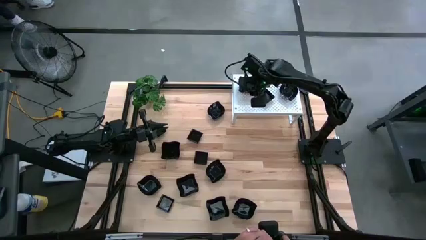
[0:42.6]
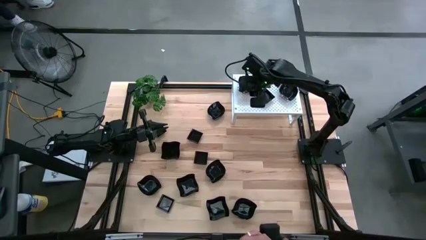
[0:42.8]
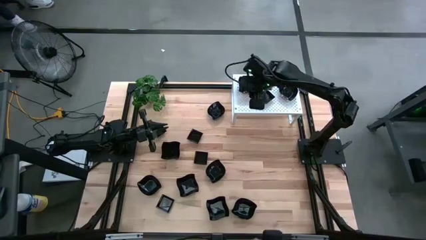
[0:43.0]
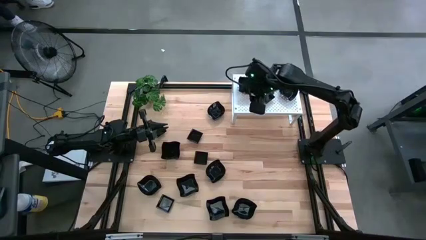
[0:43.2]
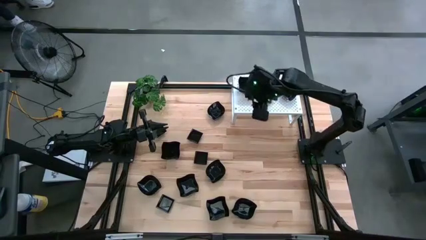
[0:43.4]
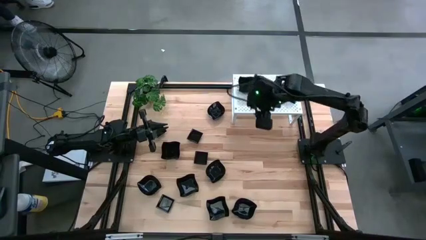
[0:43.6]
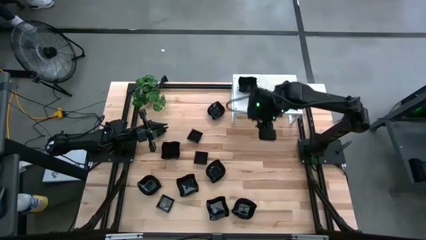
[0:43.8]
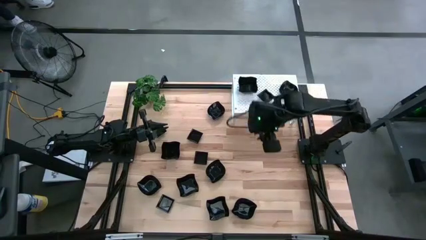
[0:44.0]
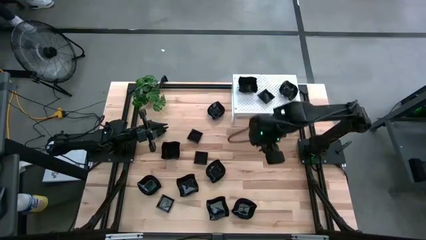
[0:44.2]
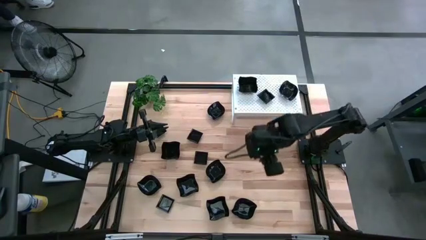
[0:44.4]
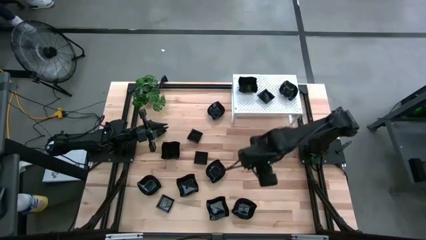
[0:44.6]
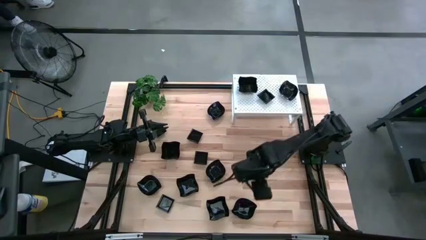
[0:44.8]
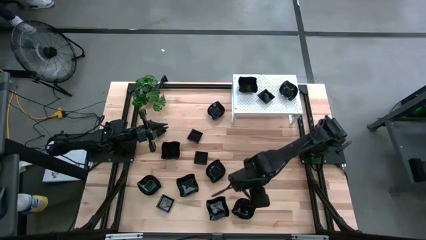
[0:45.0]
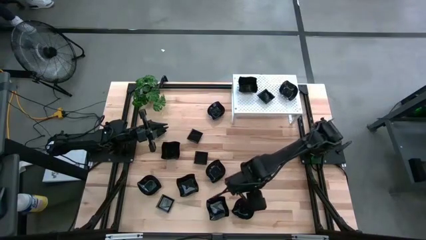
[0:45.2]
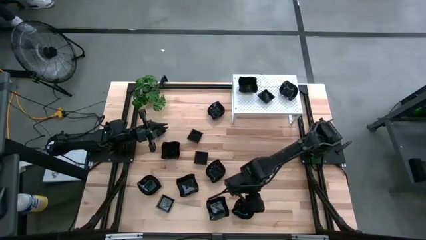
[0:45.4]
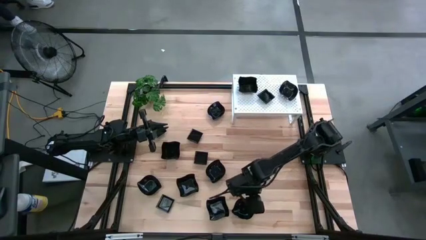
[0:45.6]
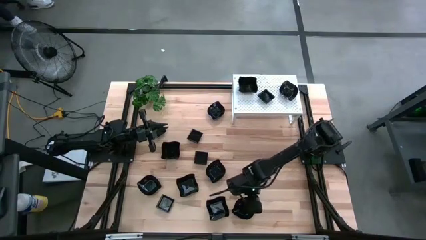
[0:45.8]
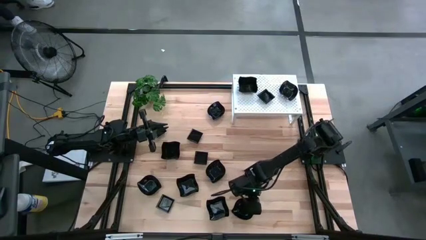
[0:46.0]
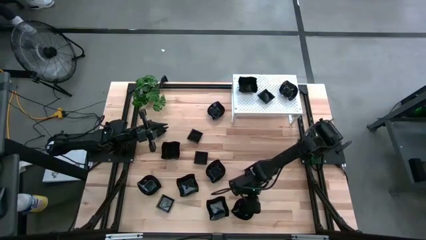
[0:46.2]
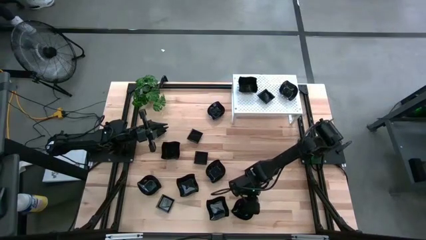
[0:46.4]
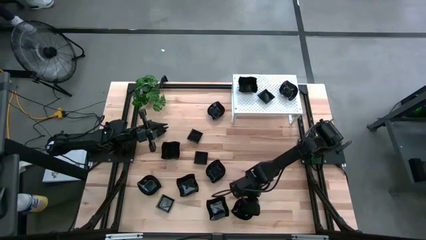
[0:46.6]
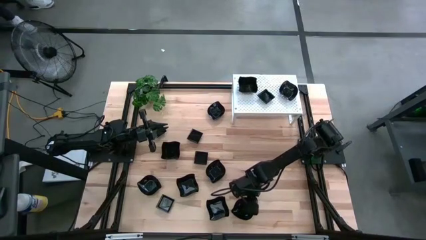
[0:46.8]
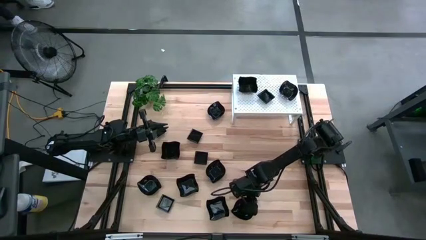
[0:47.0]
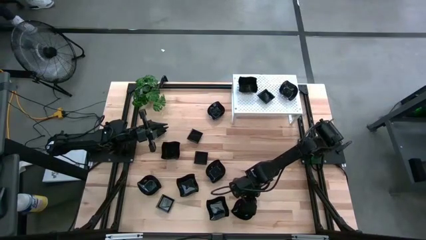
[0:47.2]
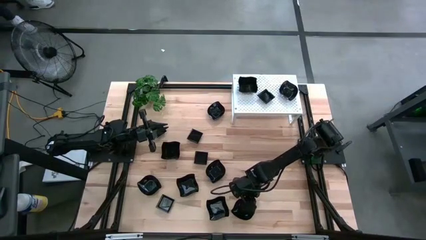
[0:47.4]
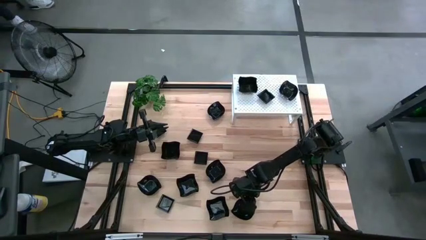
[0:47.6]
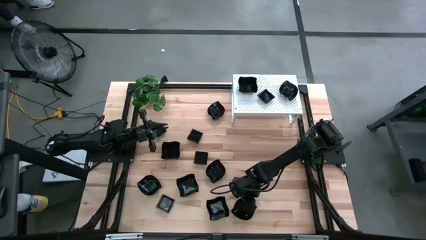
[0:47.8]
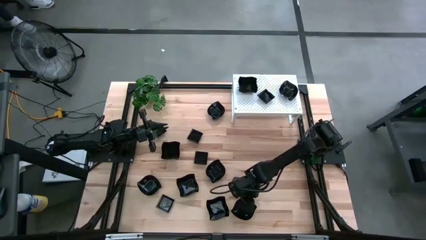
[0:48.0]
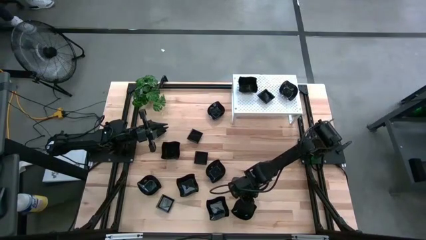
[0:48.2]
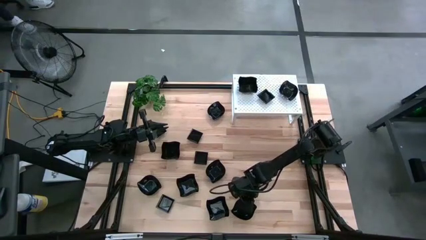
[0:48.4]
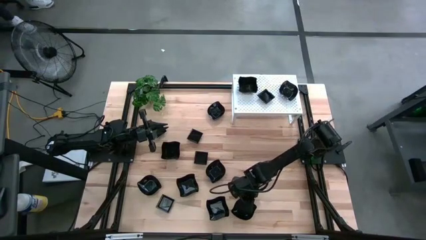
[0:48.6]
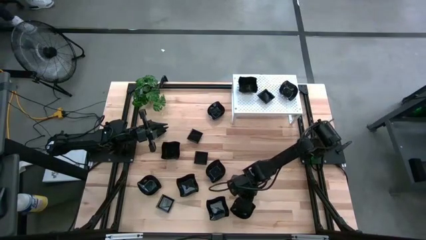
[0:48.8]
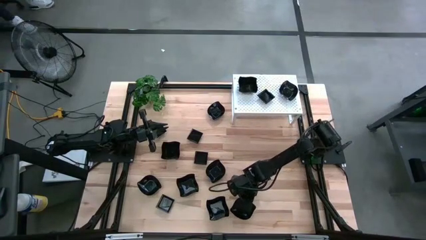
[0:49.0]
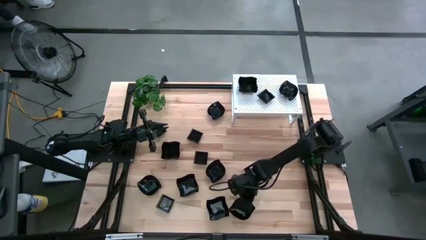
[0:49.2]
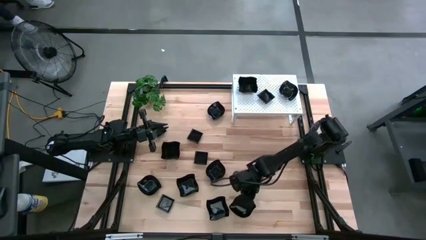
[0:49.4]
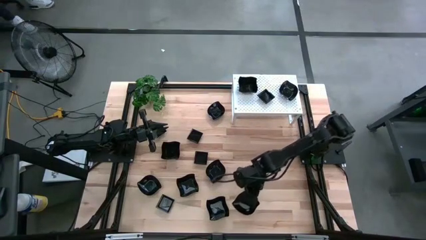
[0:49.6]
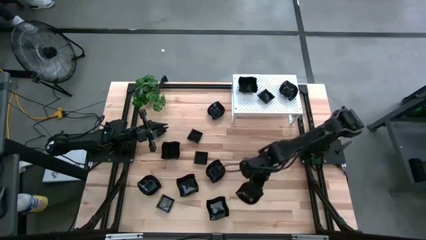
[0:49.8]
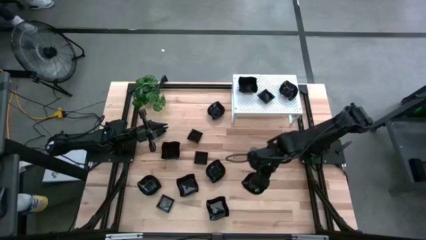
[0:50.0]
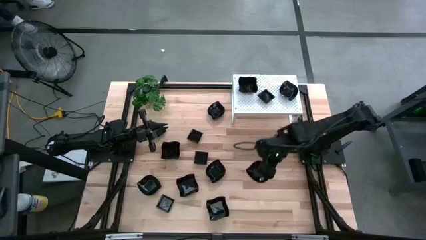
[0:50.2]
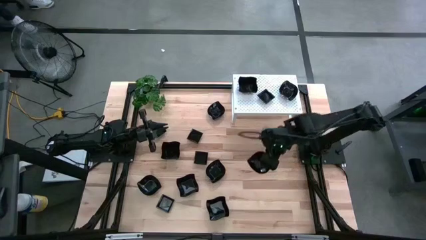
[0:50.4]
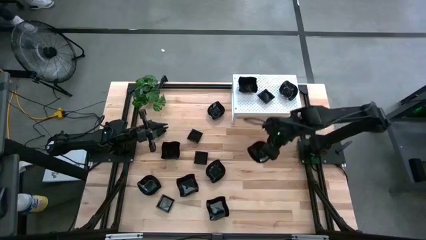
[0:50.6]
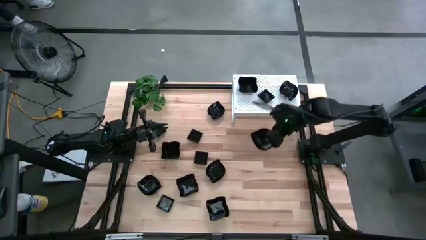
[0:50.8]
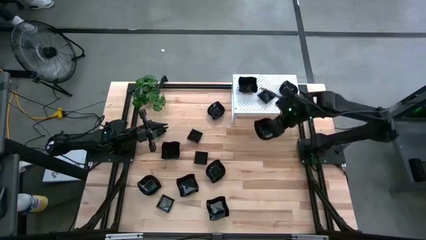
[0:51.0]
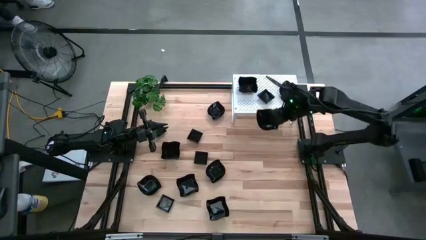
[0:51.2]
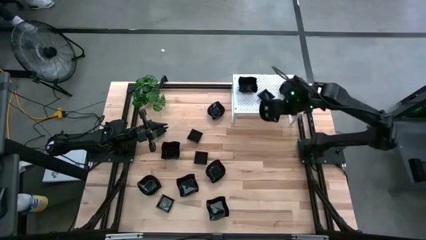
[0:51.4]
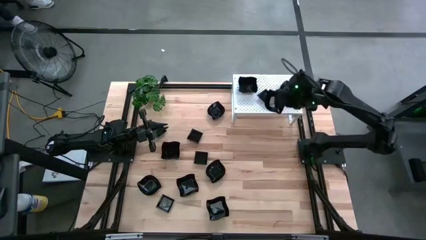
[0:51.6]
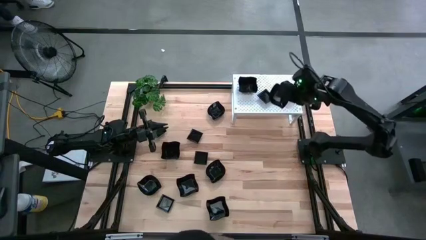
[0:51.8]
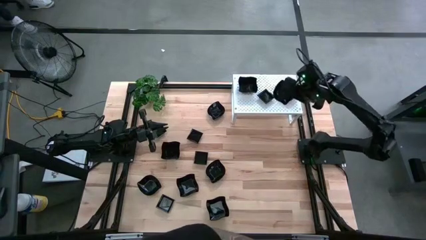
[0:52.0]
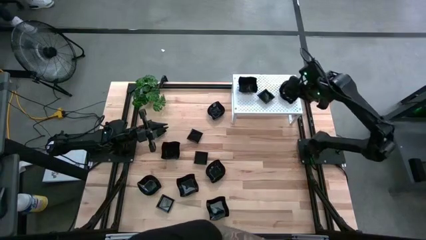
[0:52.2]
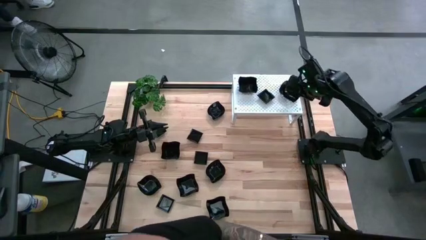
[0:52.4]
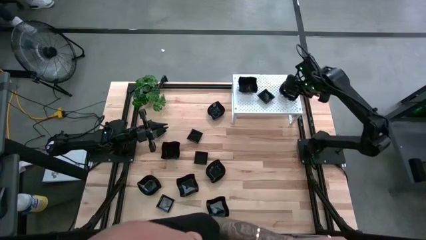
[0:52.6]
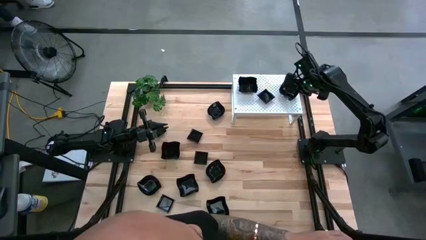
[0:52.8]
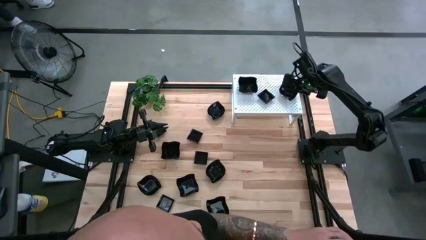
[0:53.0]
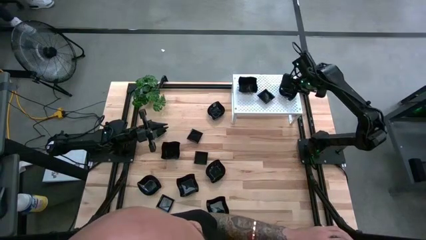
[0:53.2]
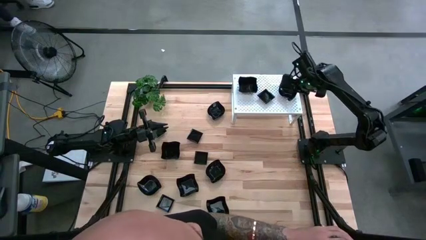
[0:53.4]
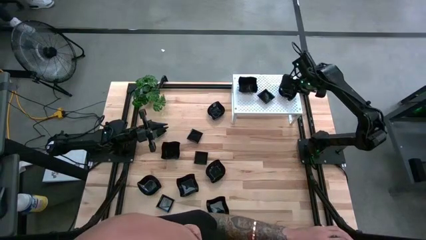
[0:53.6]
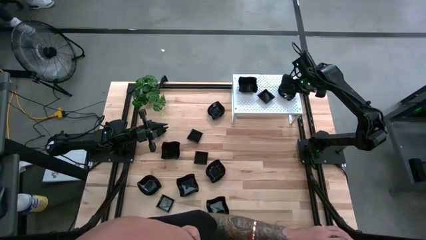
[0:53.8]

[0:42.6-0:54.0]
Task: Pick & Place Mini shaped plates
Stack the leaf-shaped plate on top of the leaf-shaped plate on the shelf

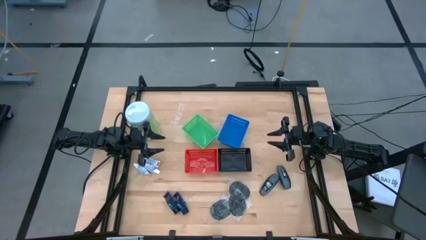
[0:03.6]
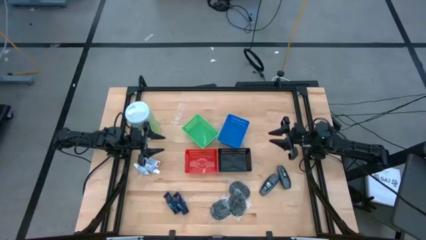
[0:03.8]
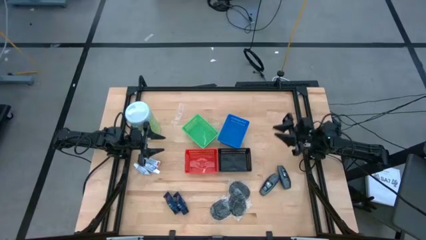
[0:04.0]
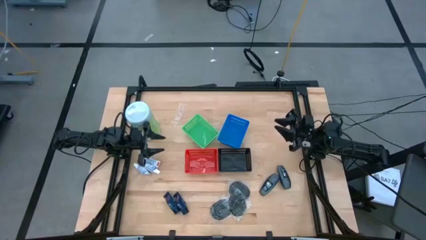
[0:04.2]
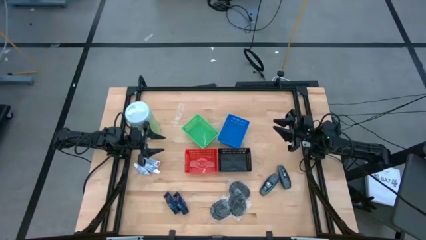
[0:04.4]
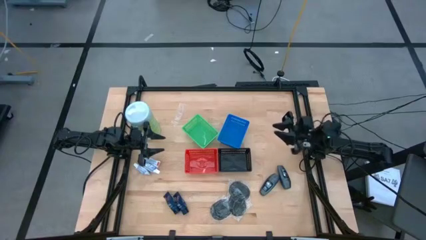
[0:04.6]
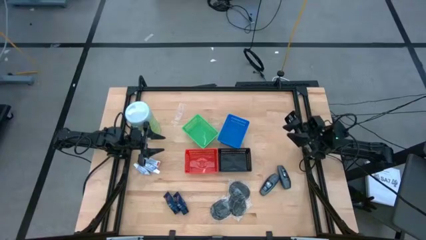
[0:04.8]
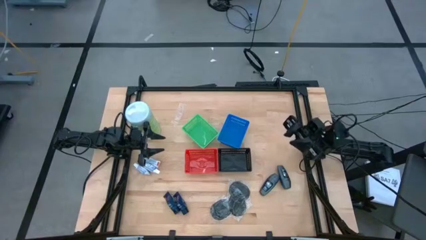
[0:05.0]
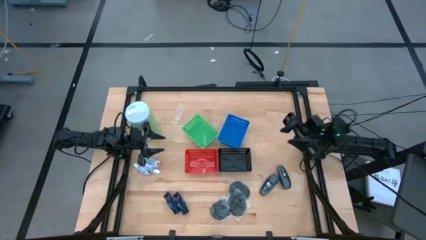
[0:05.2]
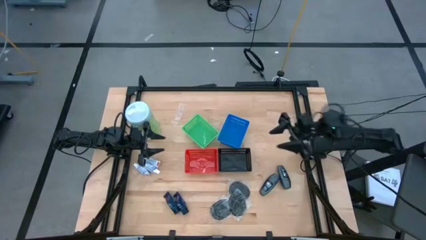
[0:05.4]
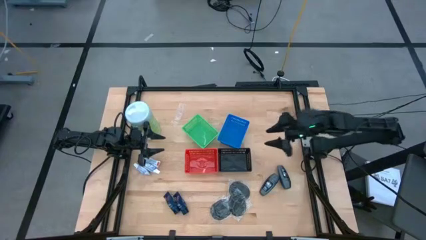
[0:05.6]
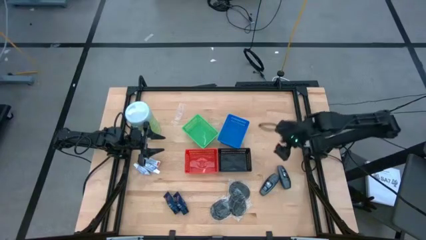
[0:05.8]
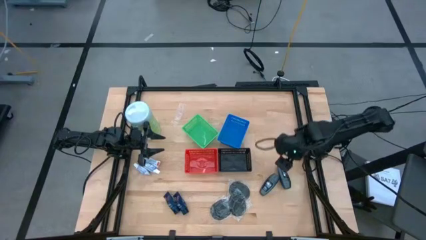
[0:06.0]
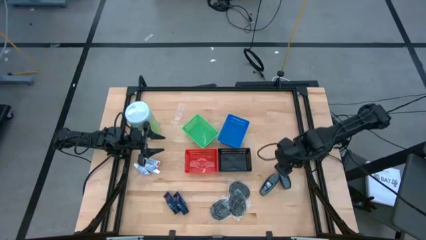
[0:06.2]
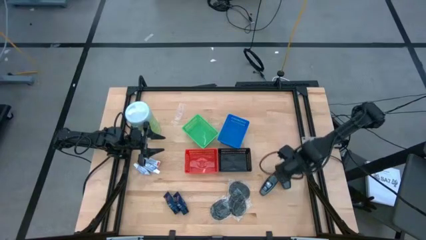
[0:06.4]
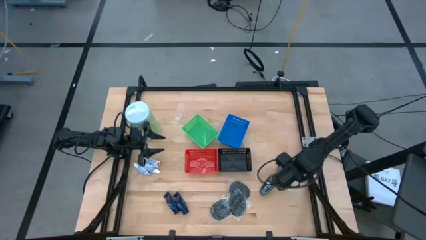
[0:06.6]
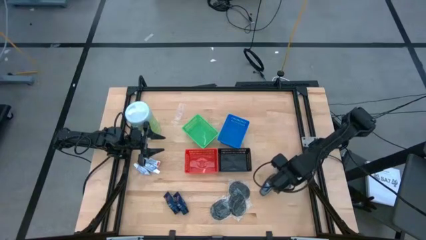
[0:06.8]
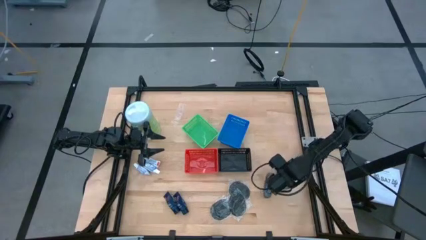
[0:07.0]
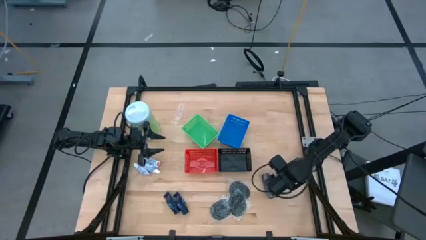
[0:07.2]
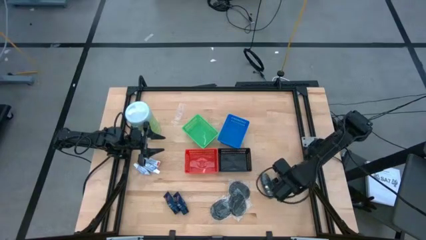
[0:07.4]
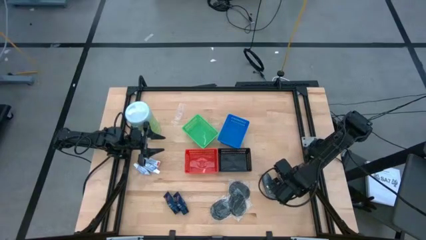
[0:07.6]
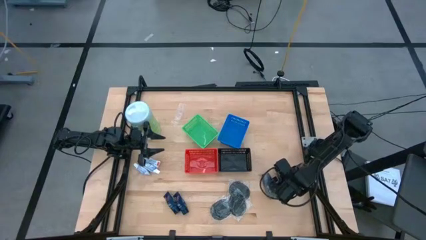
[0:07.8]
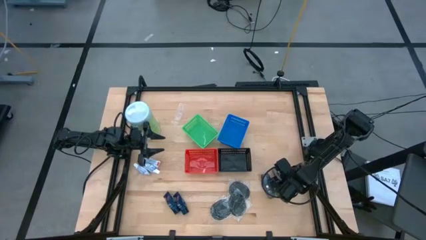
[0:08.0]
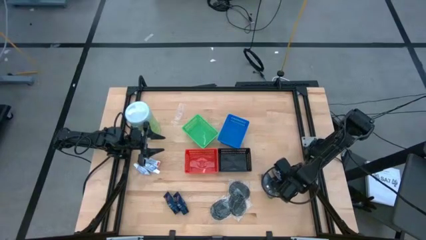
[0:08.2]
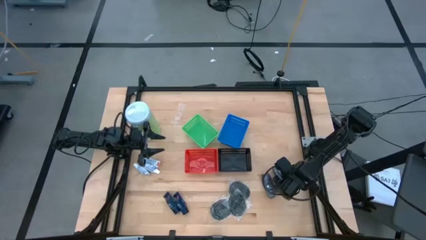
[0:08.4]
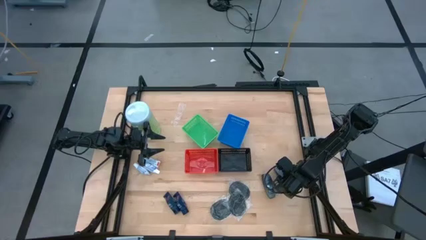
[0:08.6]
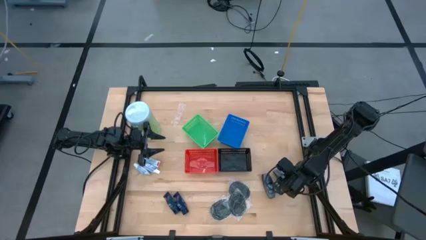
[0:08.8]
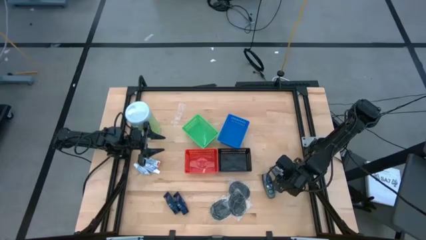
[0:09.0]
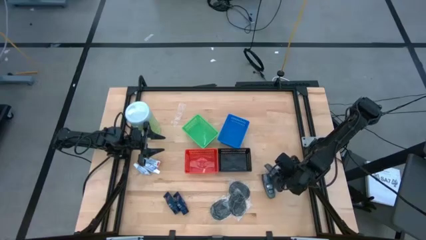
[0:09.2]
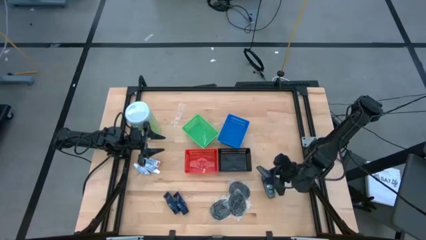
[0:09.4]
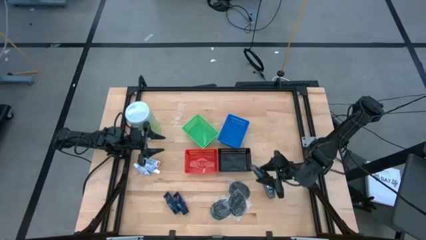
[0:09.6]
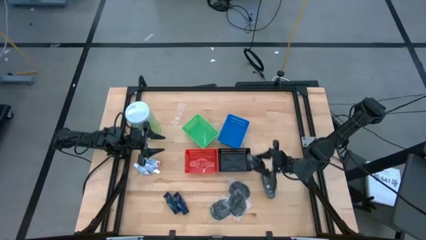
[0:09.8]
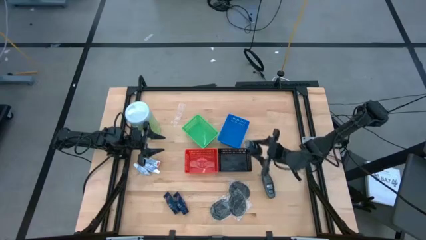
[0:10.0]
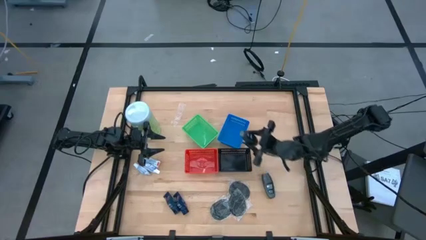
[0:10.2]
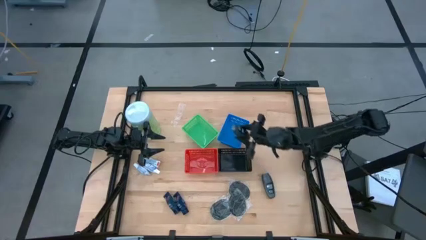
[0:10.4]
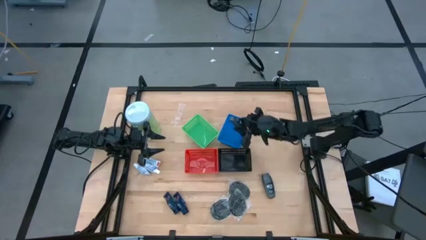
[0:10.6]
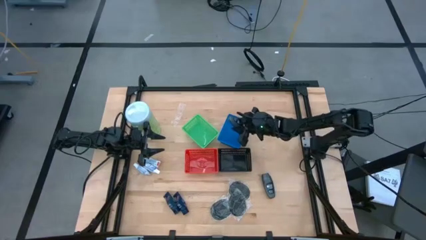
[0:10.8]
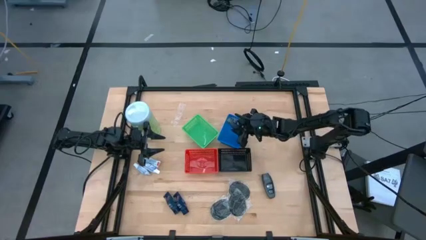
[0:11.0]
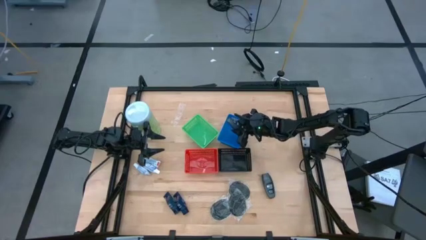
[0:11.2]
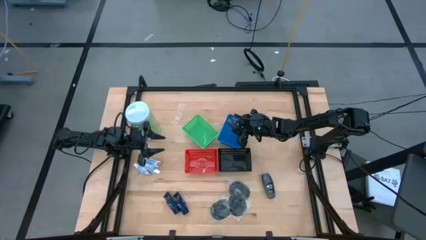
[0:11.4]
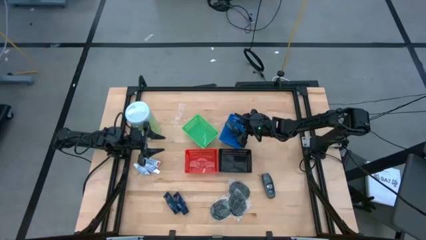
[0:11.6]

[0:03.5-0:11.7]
Task: Pick & Place Travel size toiletries
Put the right deodorant into the blue bin
